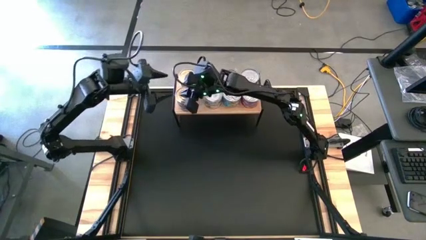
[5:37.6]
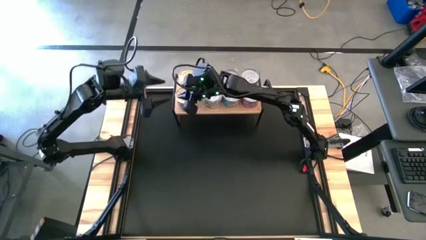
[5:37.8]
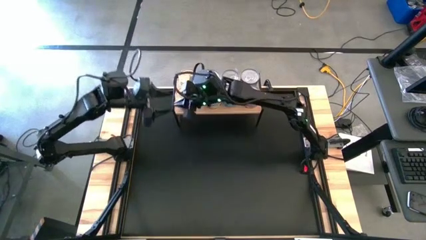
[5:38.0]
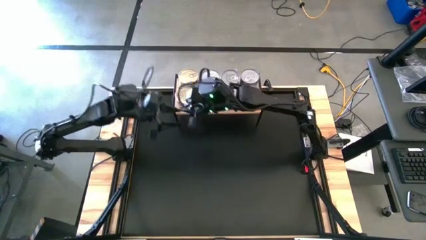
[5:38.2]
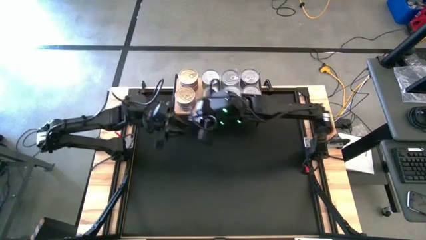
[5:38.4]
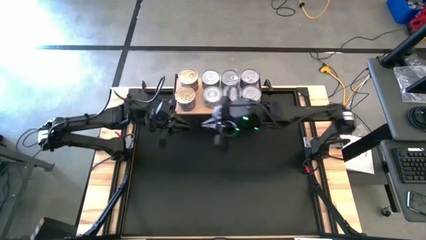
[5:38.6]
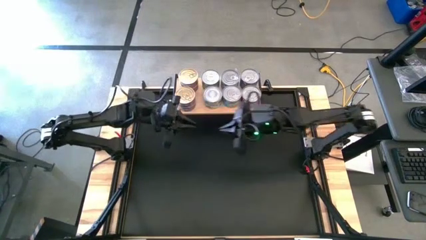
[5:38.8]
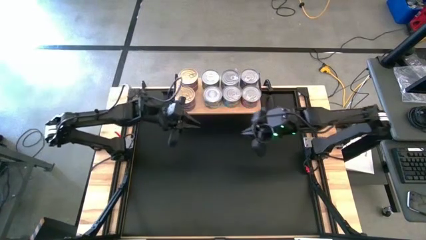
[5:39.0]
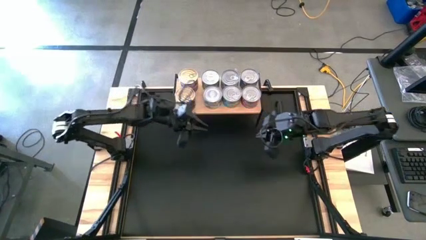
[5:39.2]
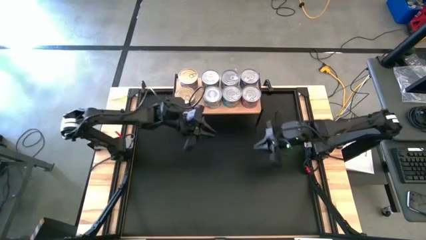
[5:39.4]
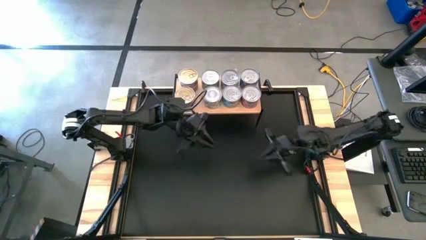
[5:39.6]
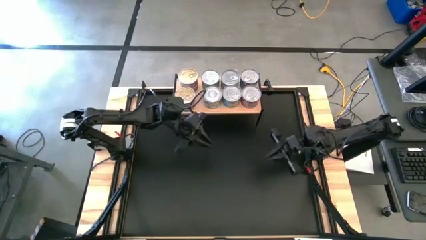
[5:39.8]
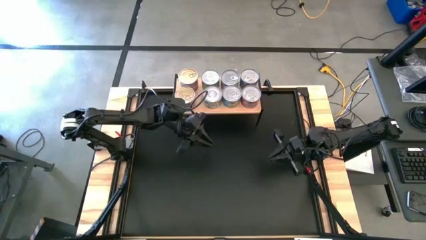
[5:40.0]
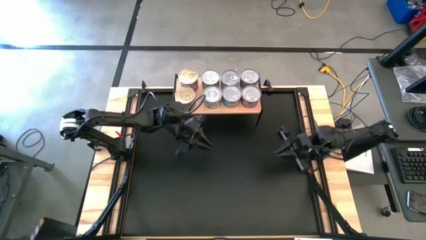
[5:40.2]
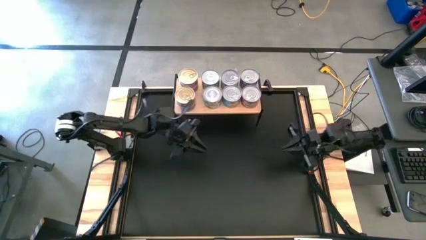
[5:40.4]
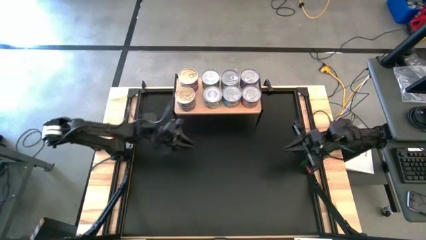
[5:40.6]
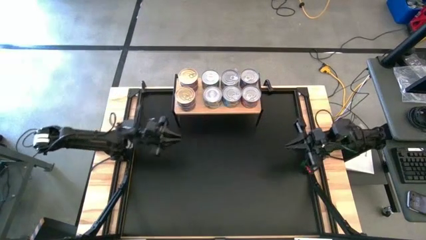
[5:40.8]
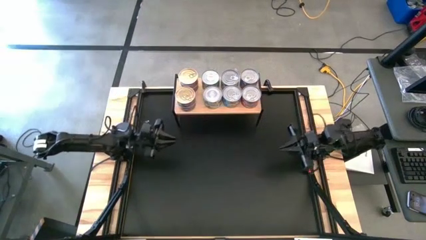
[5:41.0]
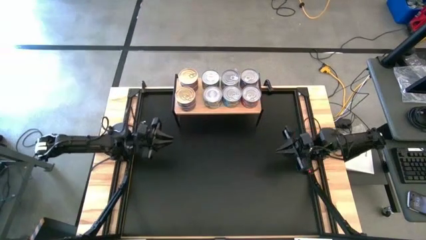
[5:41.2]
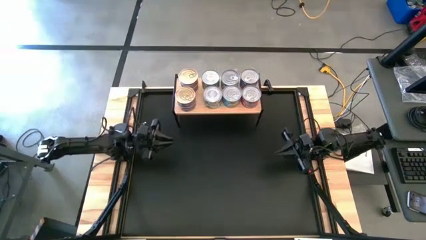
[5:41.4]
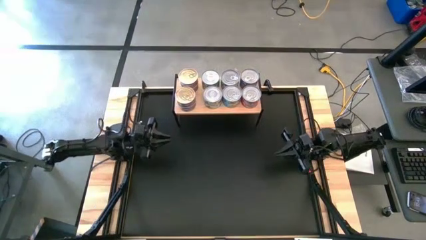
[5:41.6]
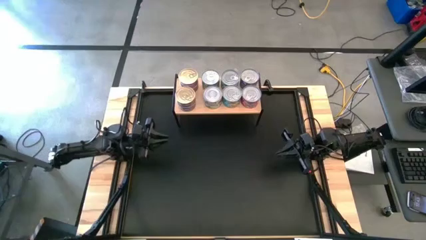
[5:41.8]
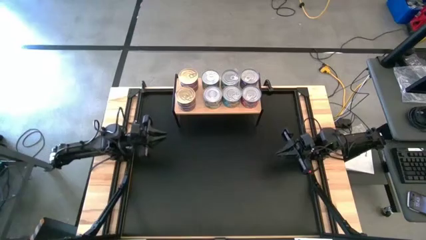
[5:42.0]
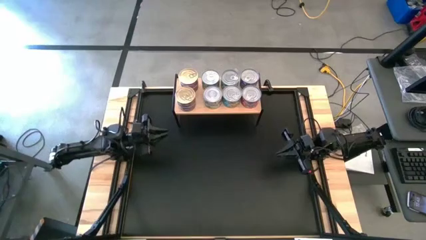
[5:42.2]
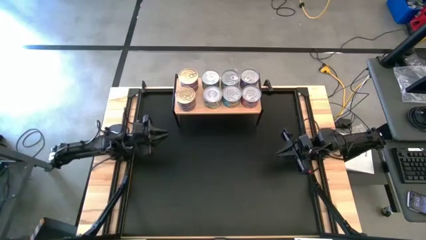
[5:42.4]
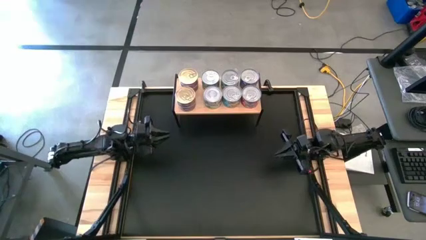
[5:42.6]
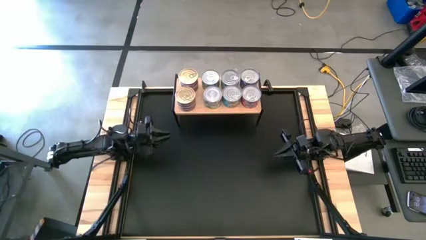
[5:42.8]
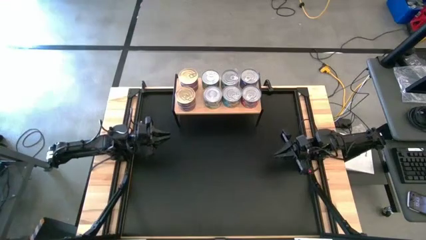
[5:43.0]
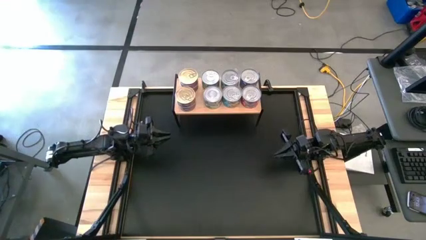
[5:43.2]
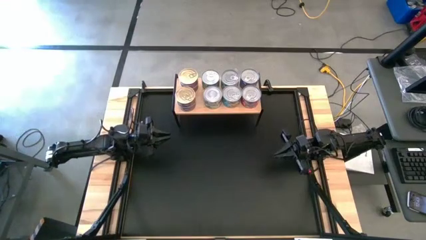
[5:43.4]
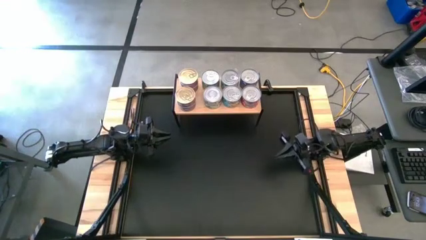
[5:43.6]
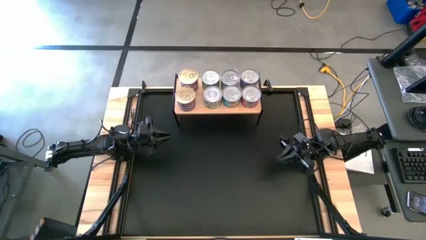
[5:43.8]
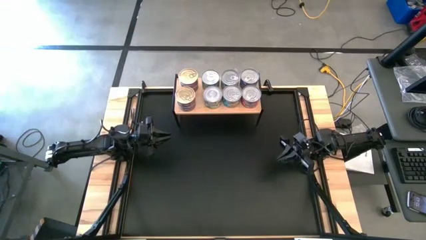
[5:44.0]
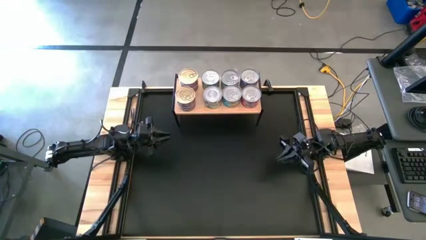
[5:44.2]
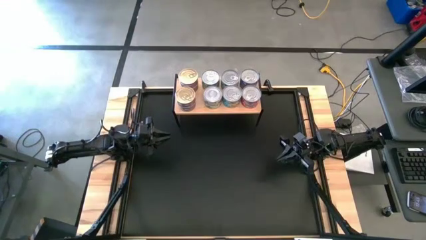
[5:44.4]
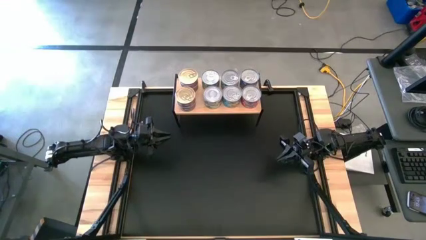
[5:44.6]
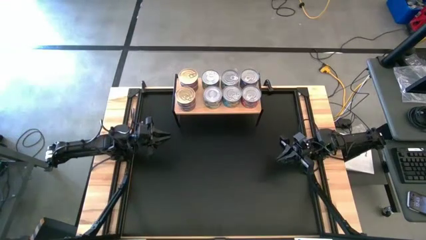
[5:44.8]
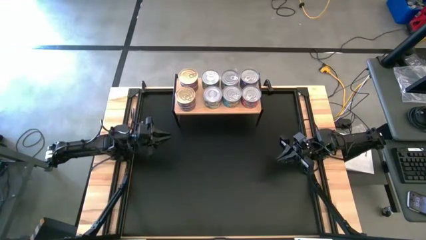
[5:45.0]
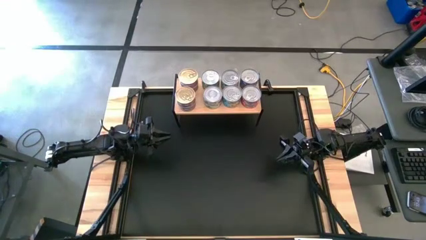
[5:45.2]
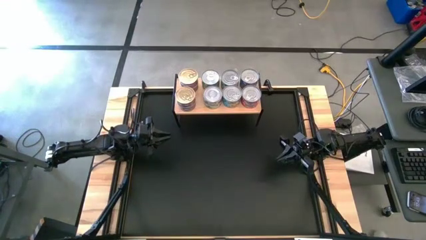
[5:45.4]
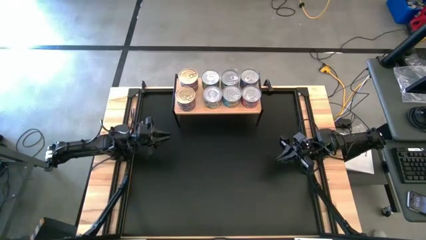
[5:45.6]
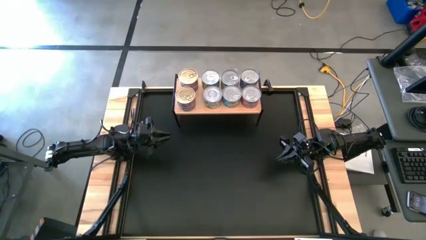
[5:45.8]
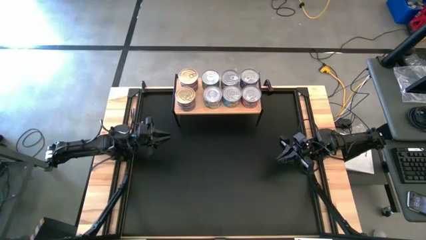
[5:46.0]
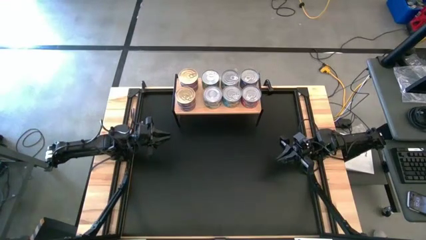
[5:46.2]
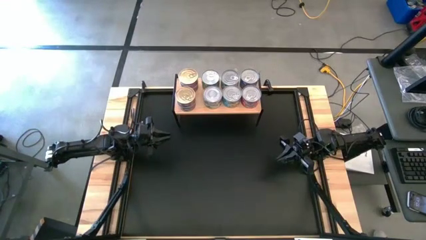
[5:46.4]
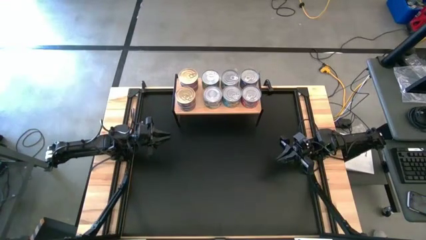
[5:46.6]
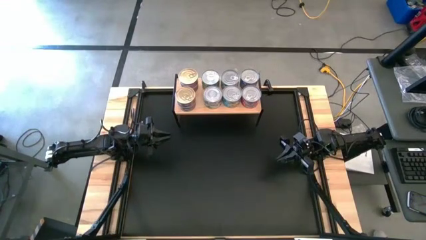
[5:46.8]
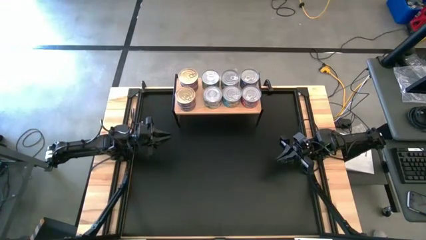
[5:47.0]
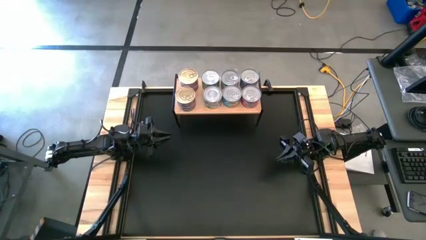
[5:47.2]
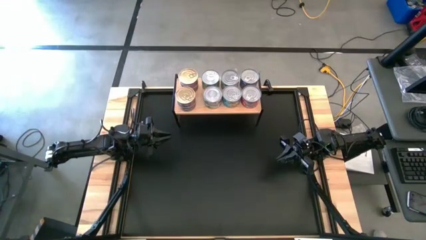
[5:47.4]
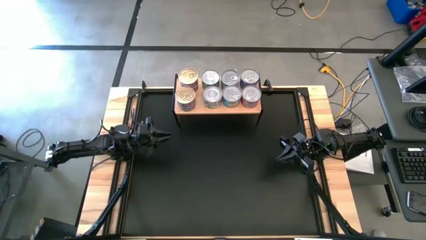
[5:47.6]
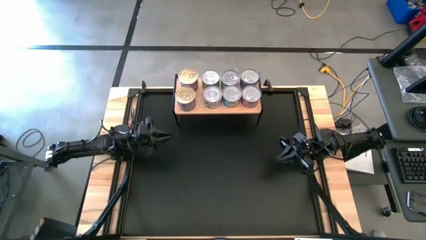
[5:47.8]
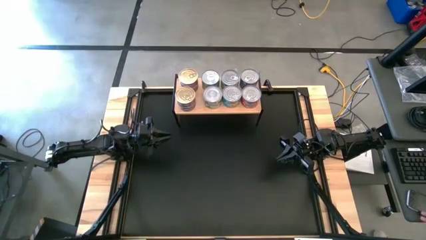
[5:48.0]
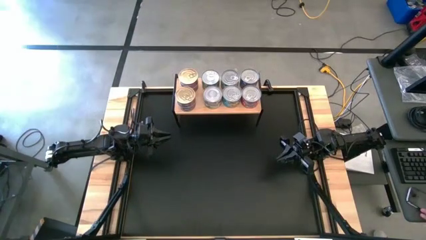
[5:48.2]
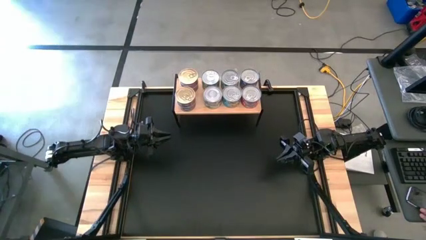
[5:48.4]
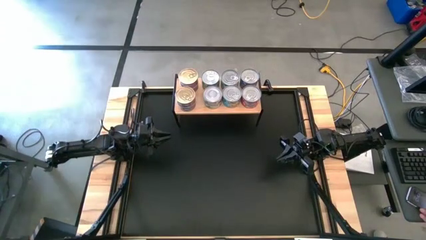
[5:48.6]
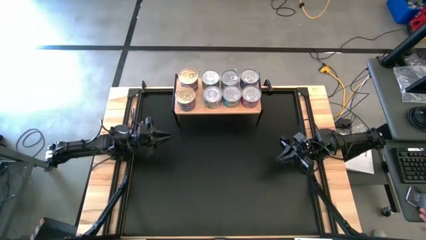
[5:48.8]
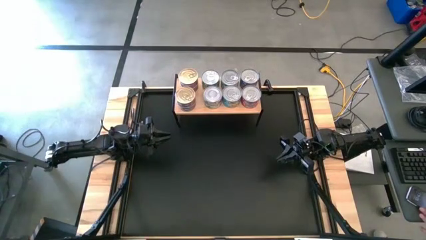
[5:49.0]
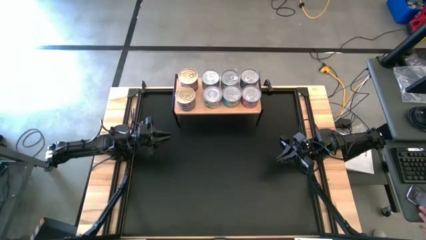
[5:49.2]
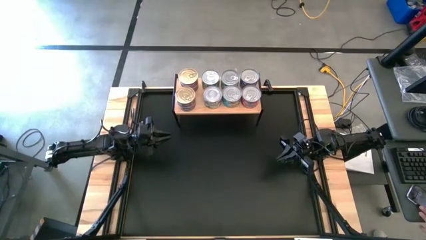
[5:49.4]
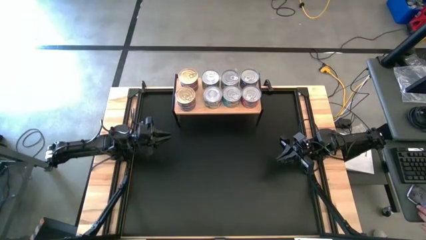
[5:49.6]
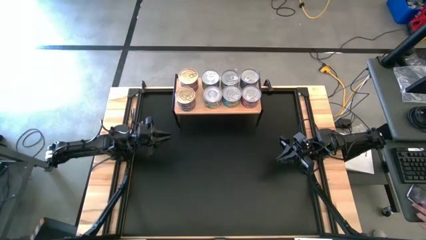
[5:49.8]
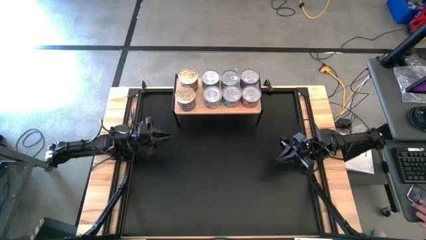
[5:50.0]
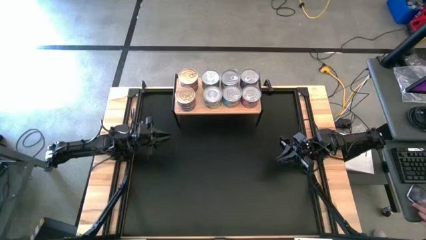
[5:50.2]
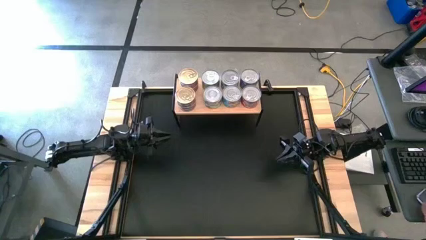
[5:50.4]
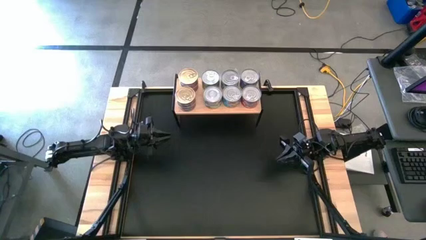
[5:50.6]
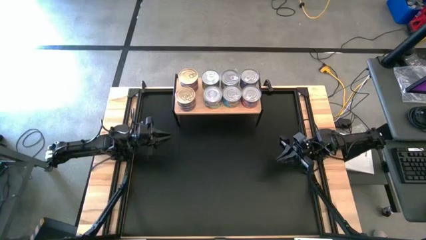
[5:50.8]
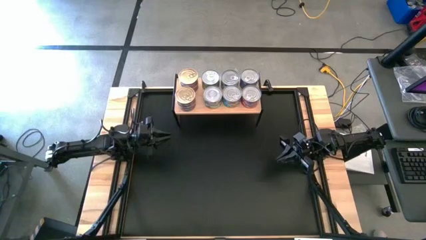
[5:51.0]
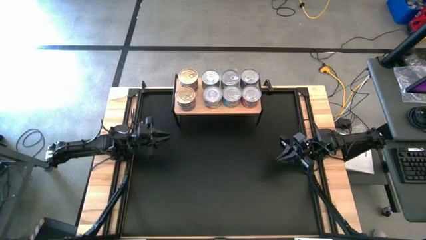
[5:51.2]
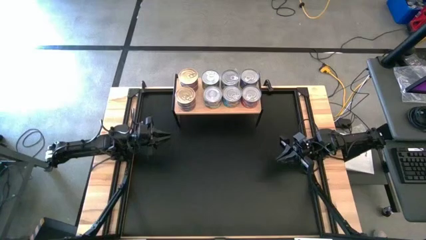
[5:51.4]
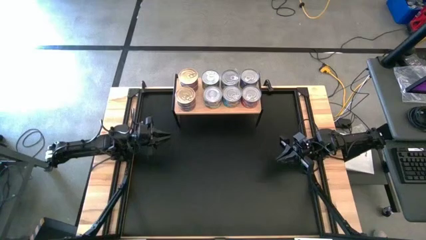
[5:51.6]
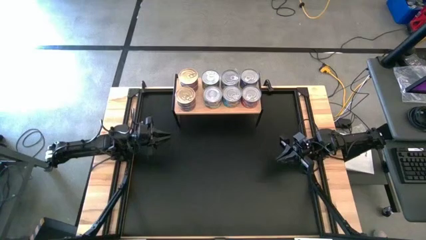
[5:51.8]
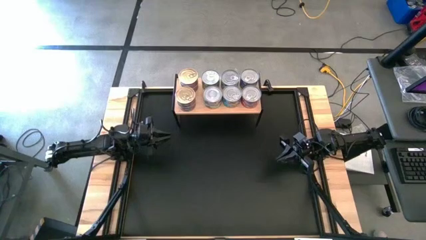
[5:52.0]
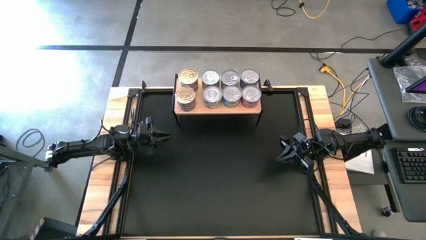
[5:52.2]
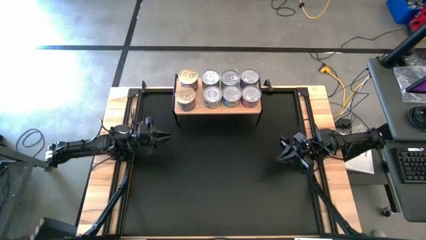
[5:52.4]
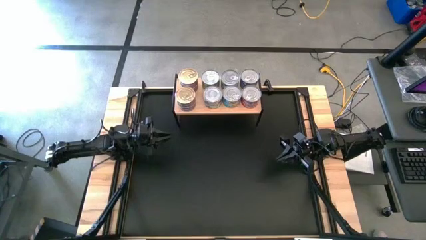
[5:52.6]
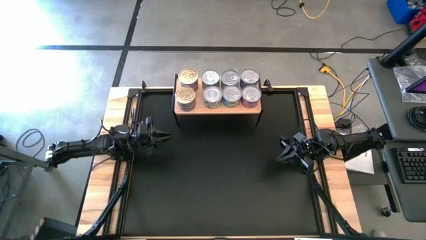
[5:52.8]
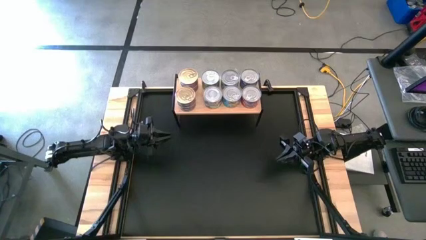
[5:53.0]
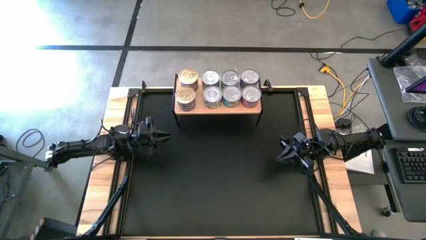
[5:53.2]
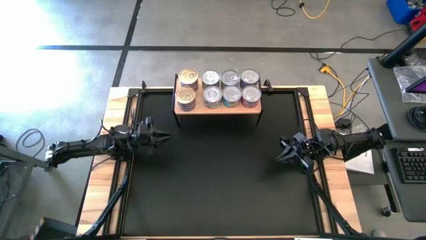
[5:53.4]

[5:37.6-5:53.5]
Task: Stack canned seafood by type on shelf
Return to Home Position
